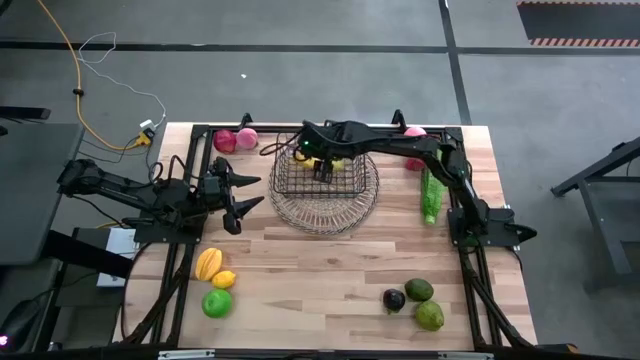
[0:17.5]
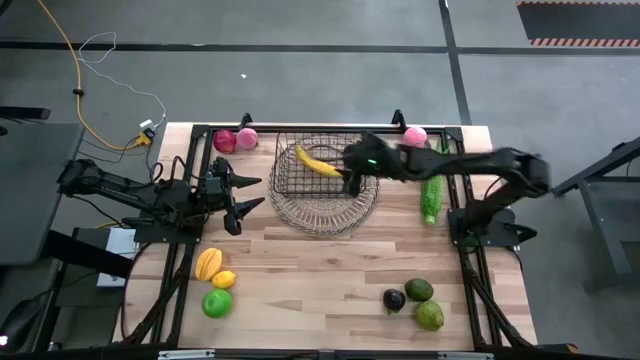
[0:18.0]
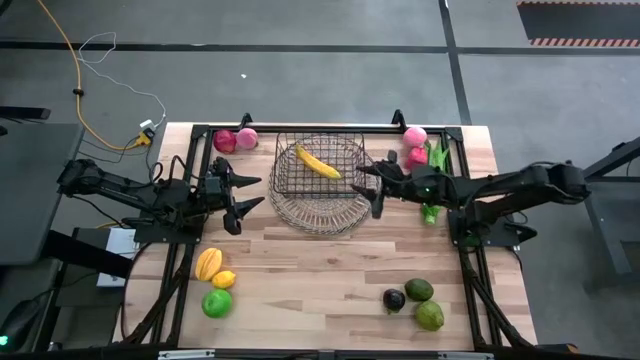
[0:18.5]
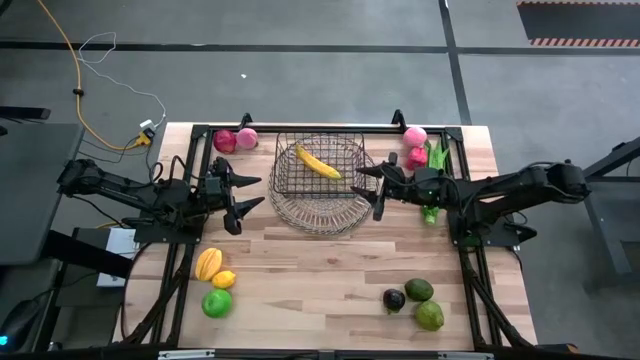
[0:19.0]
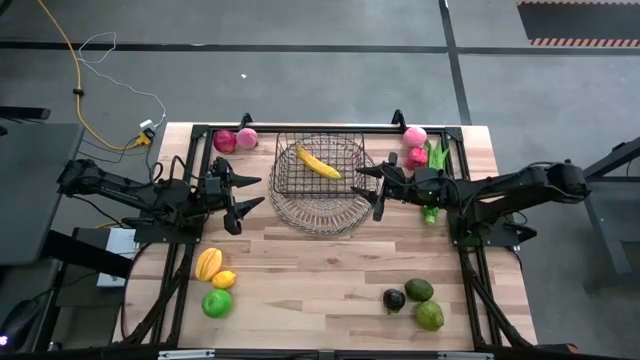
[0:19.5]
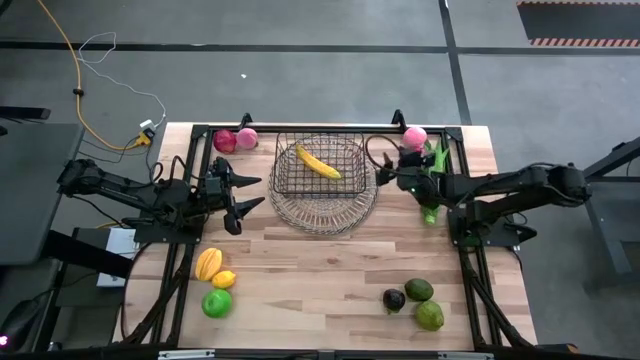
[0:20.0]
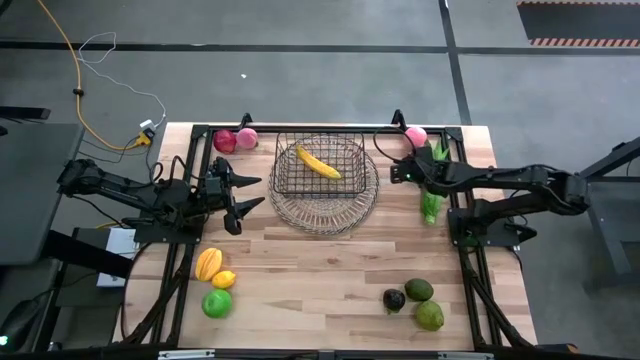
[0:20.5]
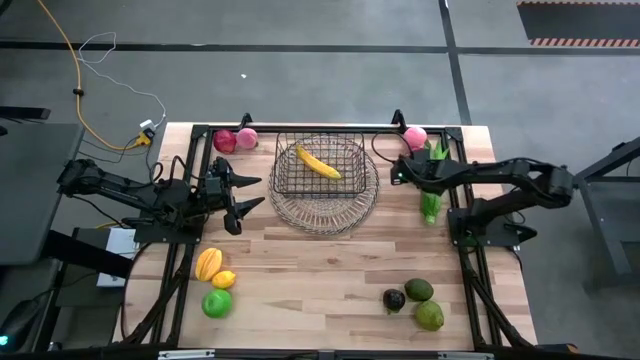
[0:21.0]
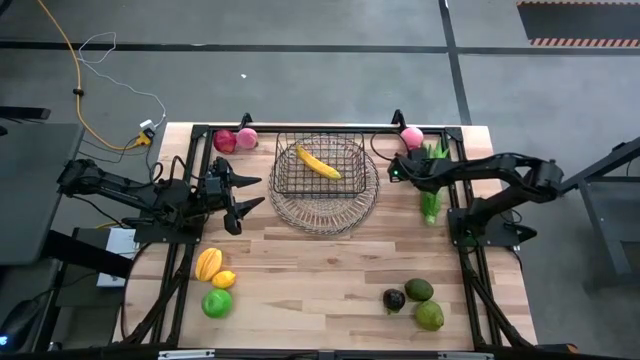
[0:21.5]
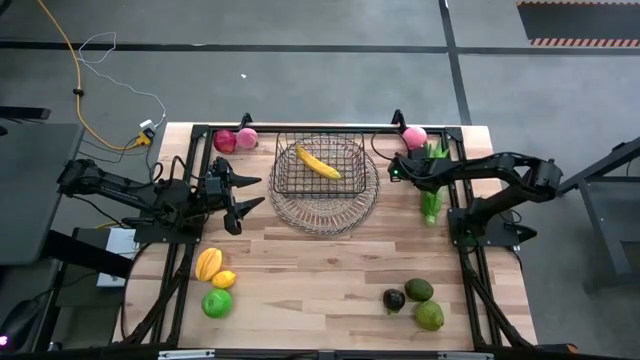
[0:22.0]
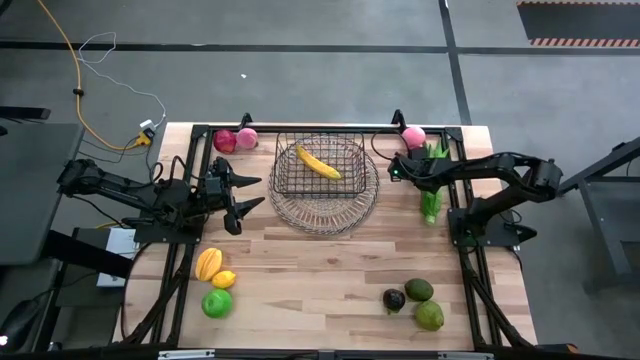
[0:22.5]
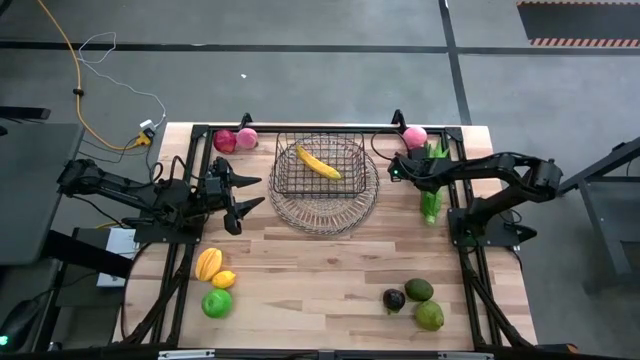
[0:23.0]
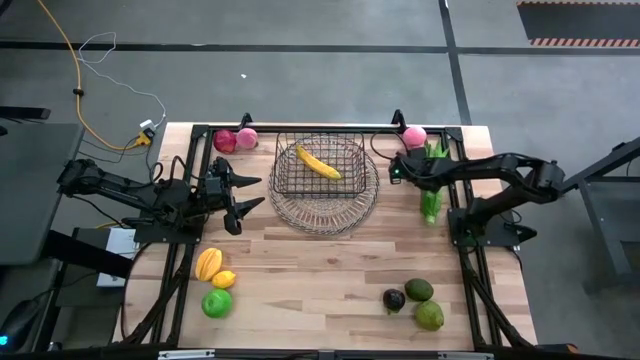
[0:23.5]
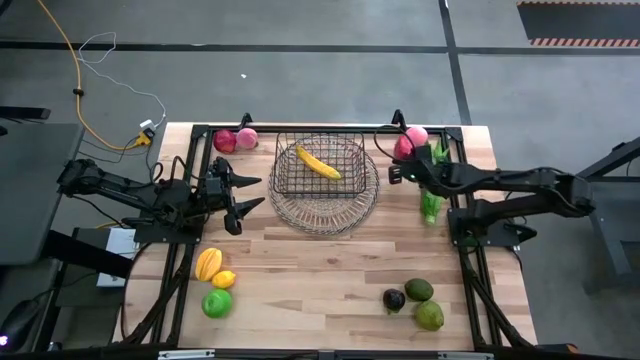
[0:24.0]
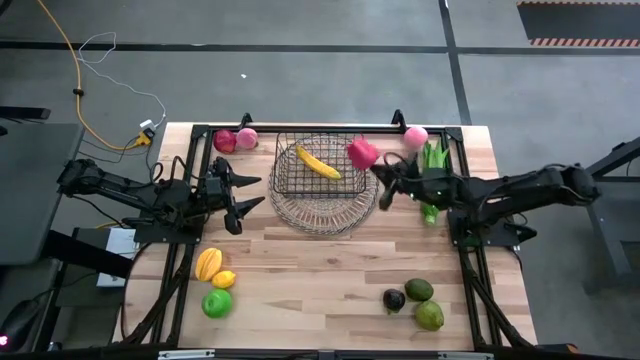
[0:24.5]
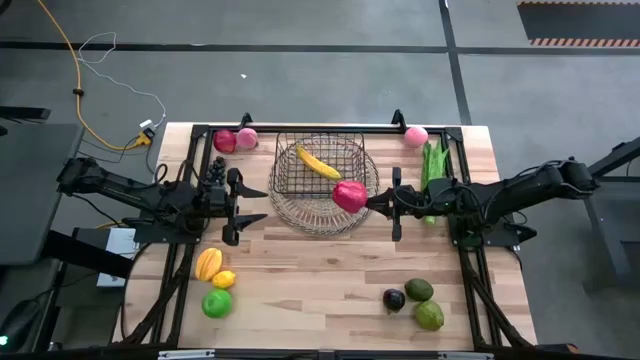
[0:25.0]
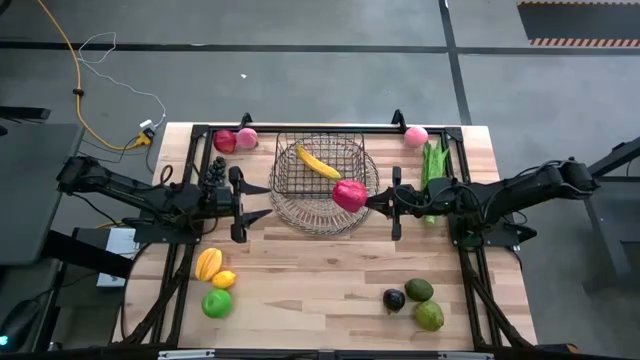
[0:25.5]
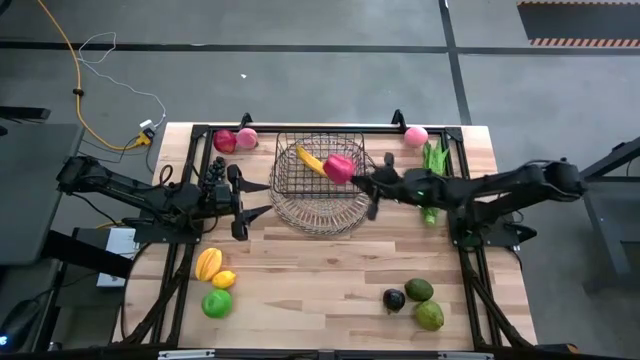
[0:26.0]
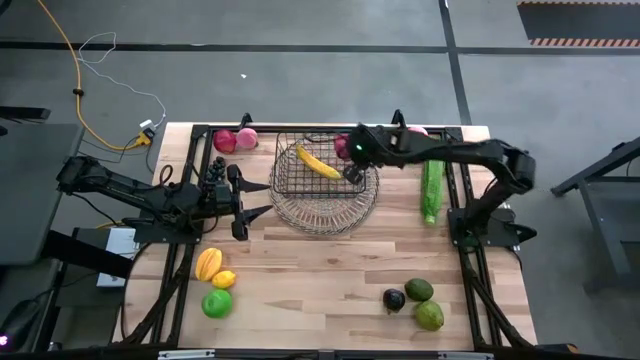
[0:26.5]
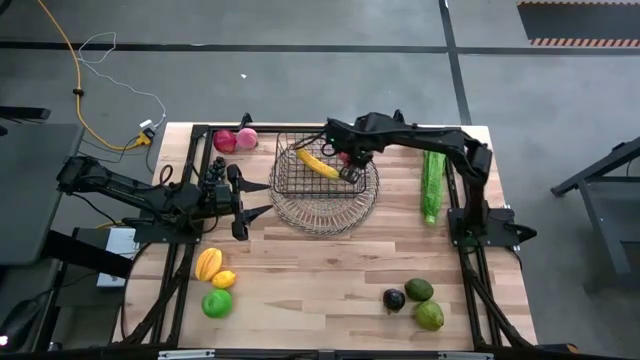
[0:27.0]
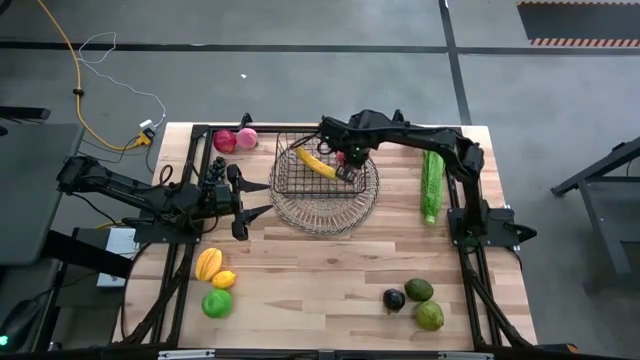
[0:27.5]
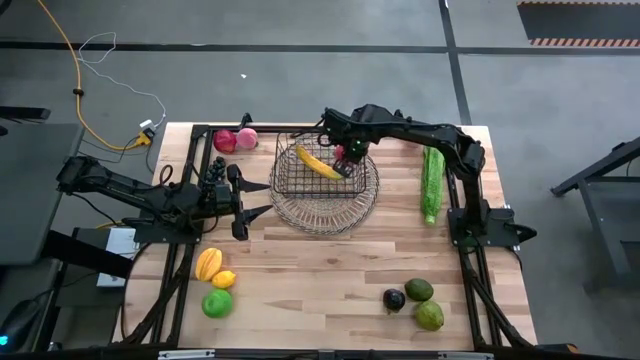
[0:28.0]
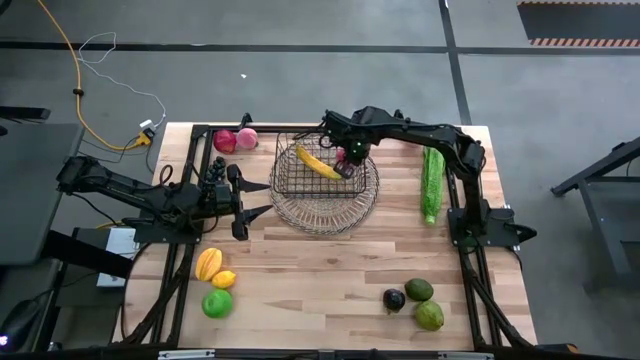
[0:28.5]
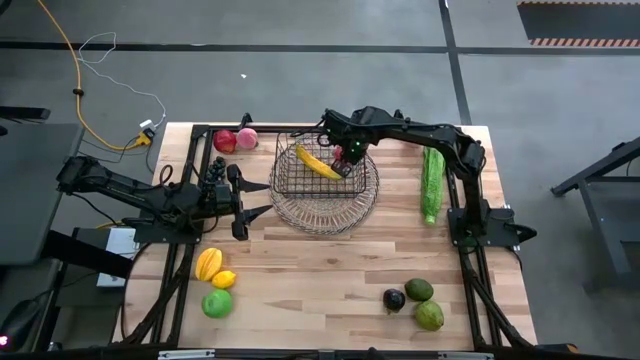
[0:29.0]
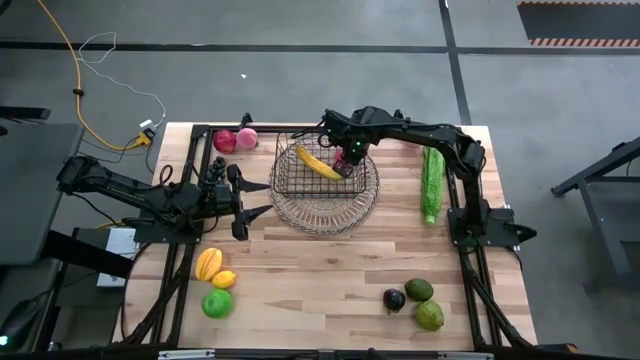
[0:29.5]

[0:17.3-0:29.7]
Task: Build produce basket
Put the red chili pepper into the wire basket

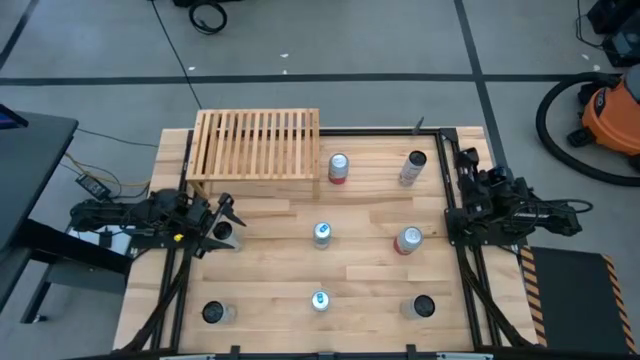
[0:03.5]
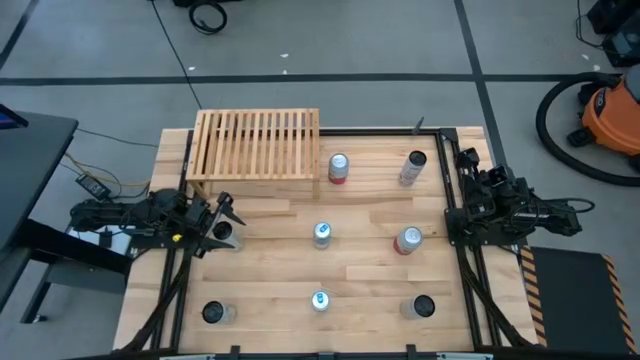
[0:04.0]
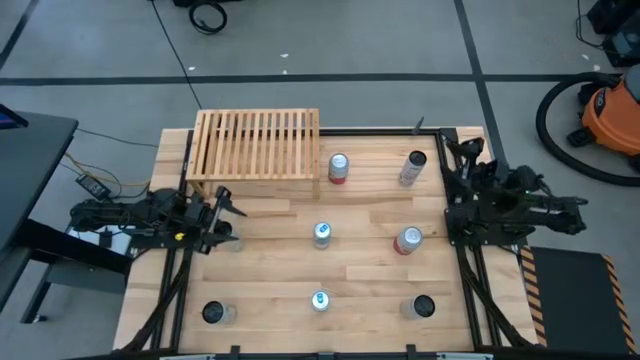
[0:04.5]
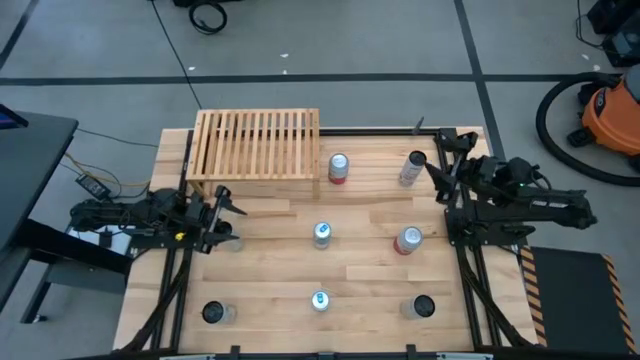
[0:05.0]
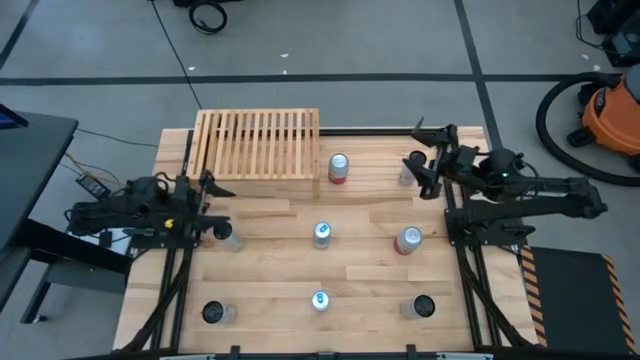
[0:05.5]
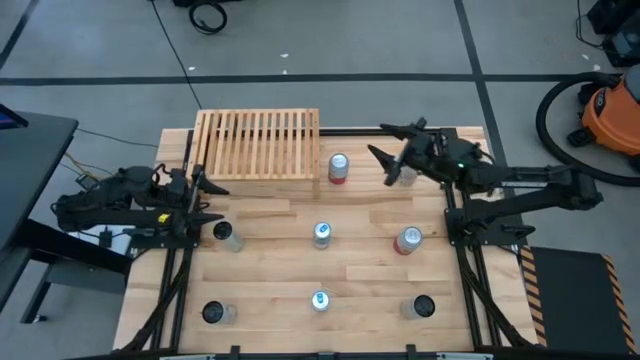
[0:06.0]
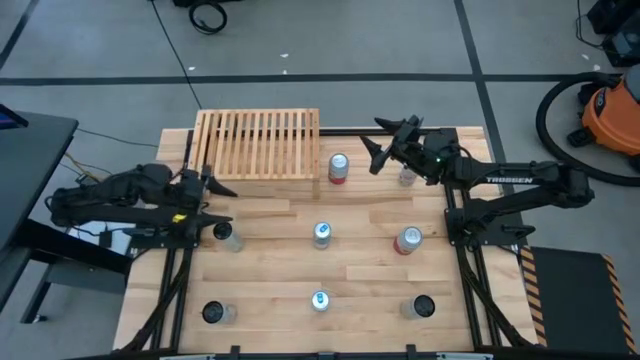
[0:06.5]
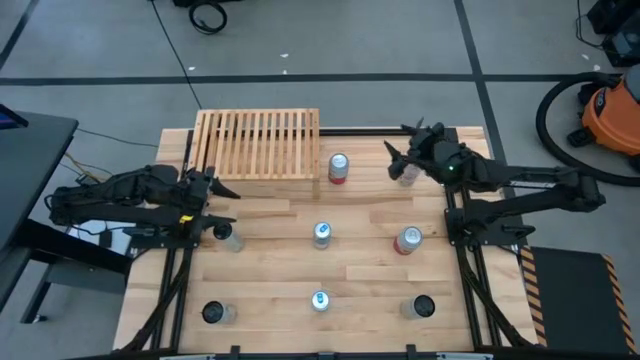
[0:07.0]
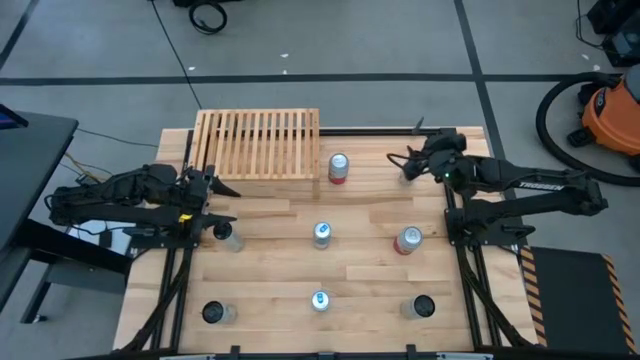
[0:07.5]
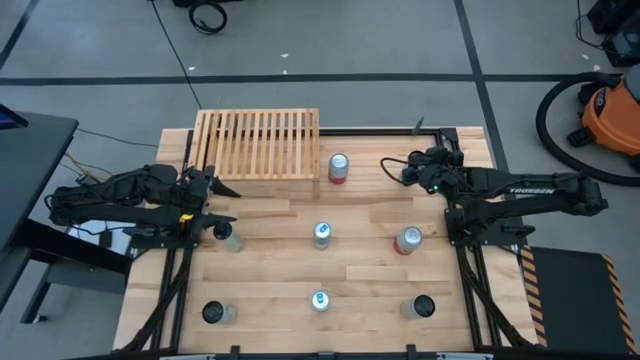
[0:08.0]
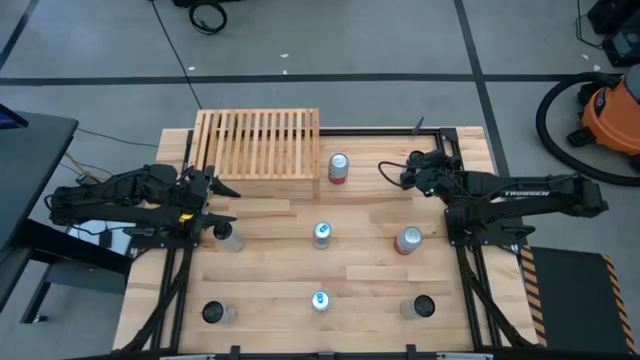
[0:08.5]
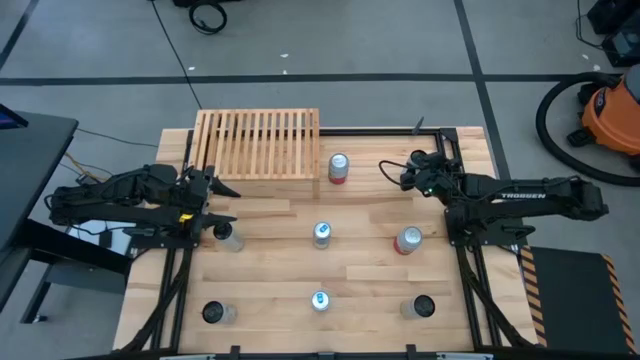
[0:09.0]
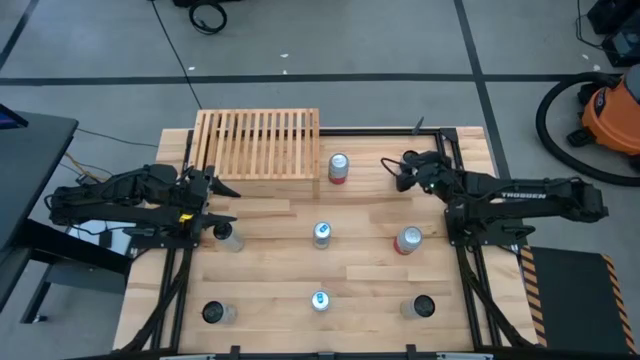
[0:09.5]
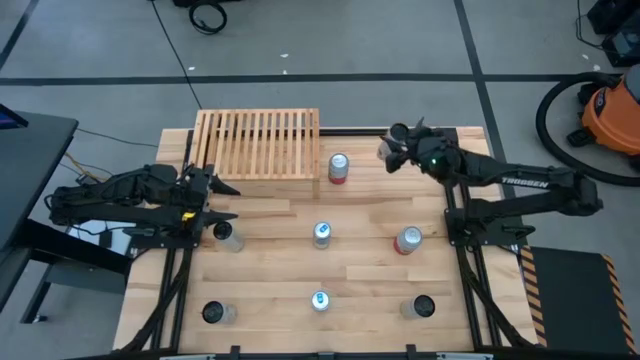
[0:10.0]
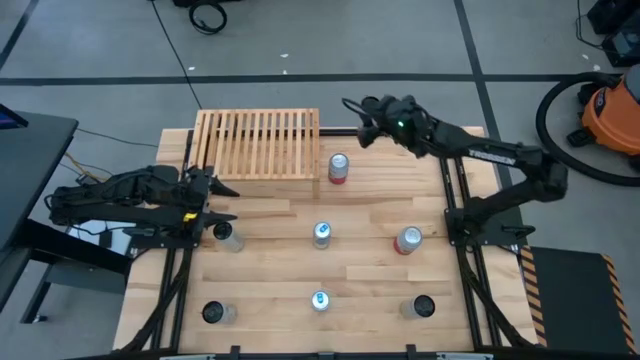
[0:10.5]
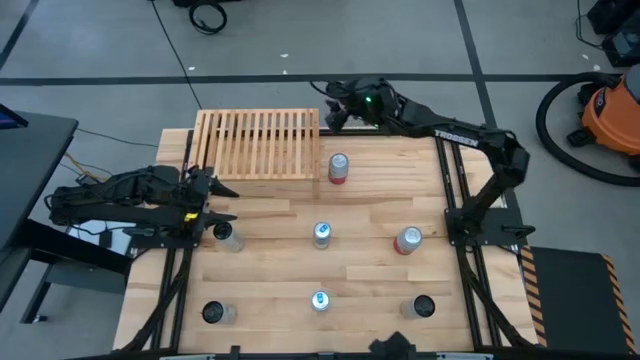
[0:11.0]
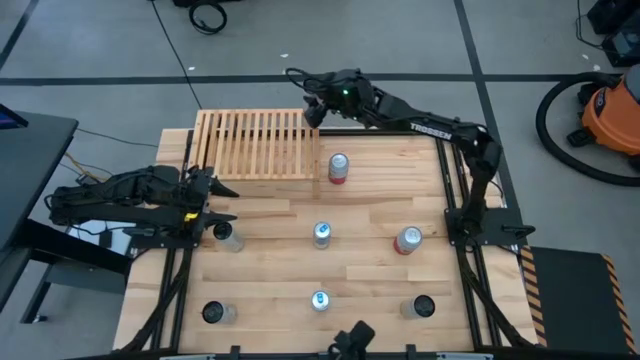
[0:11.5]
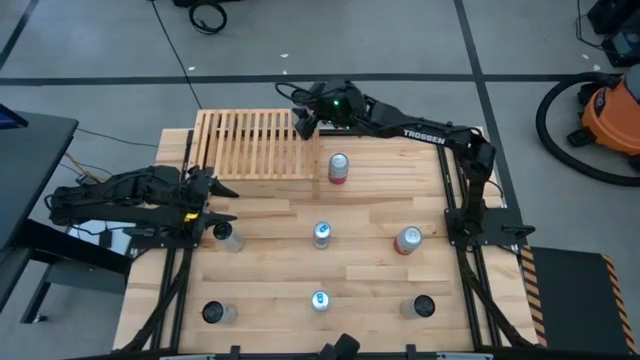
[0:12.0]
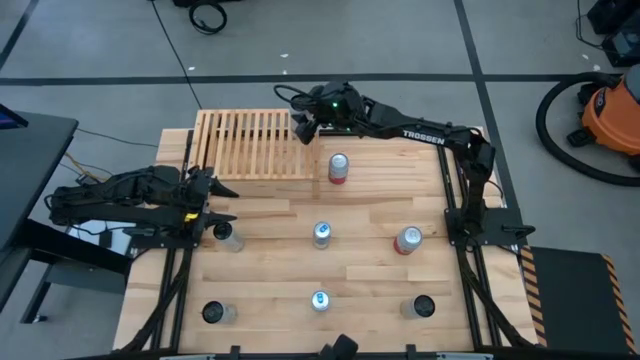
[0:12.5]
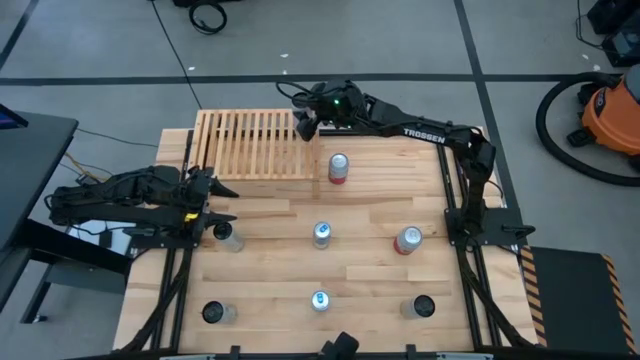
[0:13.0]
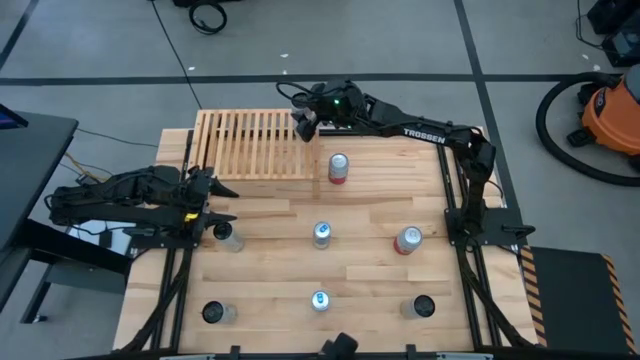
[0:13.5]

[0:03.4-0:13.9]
Task: Place canned beverage on shelf
Put the top white pink soda can on the shelf
